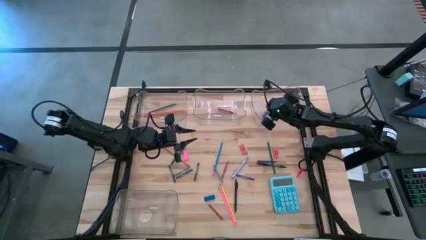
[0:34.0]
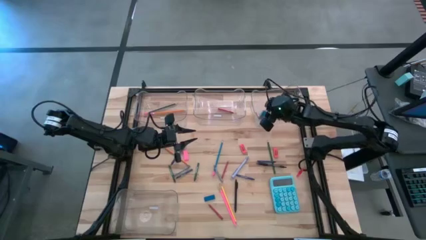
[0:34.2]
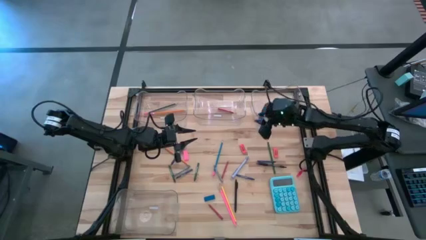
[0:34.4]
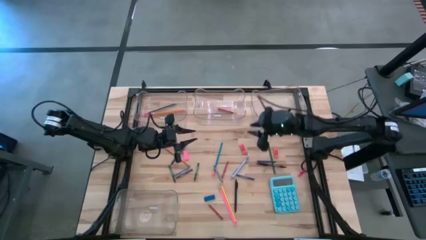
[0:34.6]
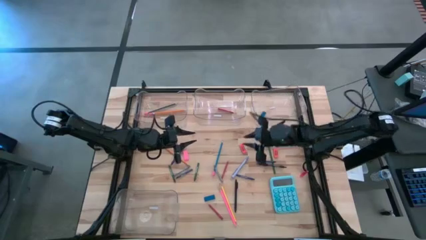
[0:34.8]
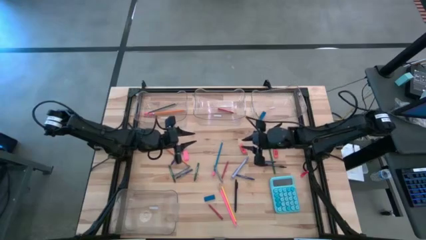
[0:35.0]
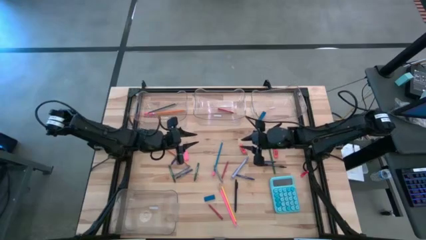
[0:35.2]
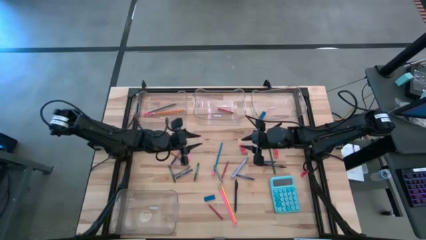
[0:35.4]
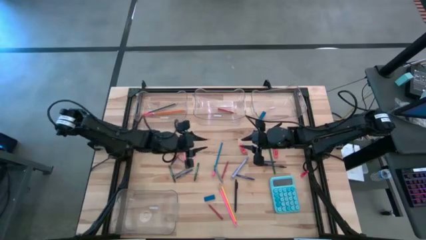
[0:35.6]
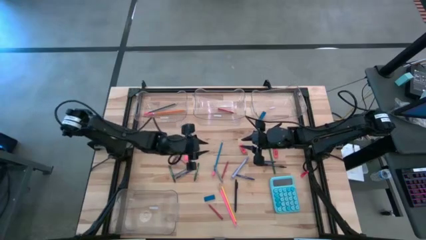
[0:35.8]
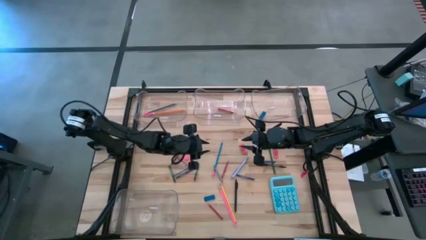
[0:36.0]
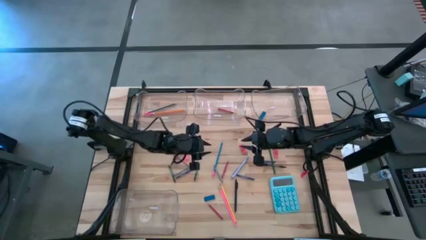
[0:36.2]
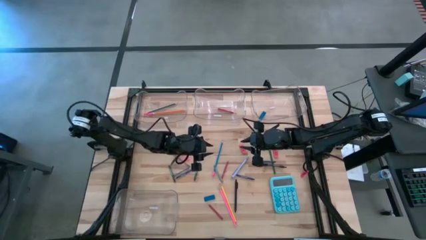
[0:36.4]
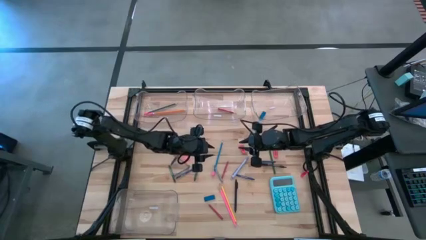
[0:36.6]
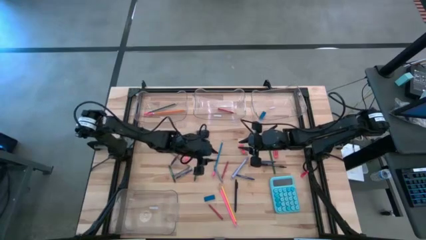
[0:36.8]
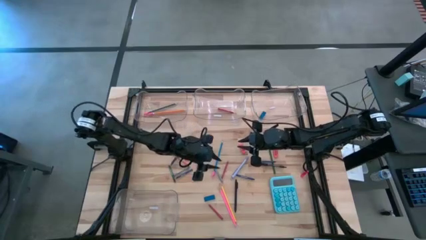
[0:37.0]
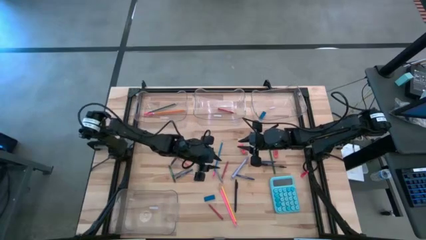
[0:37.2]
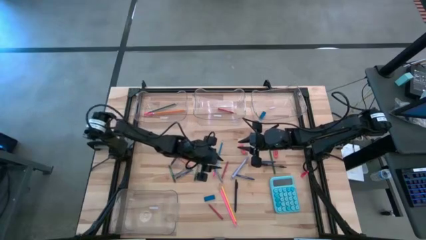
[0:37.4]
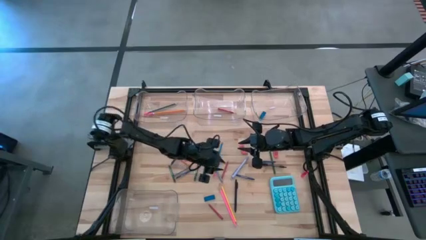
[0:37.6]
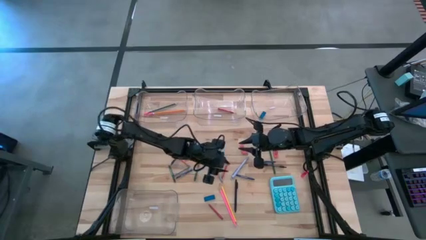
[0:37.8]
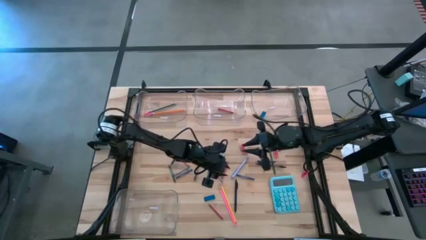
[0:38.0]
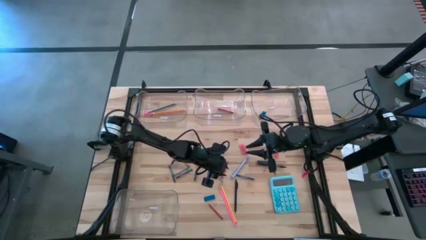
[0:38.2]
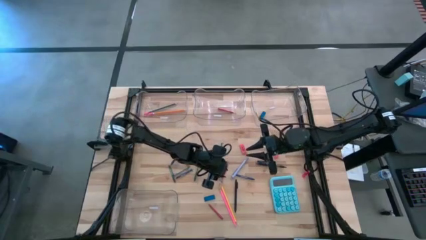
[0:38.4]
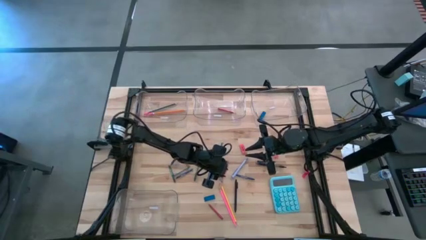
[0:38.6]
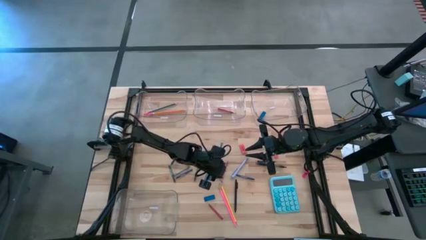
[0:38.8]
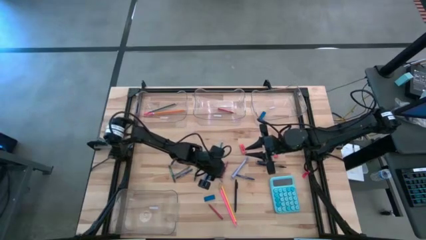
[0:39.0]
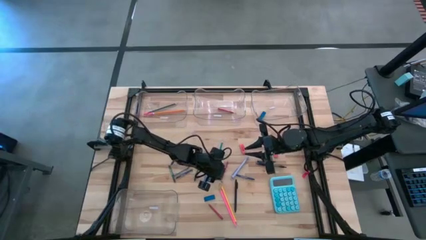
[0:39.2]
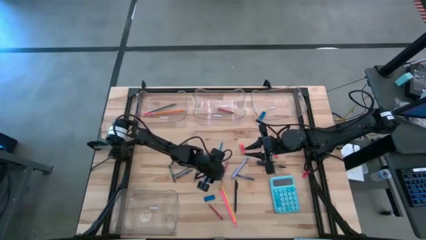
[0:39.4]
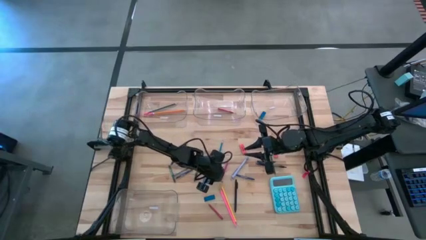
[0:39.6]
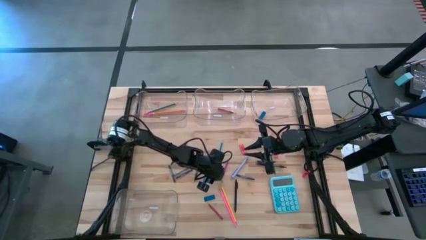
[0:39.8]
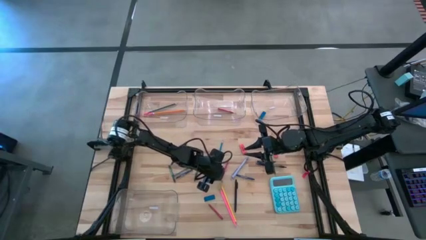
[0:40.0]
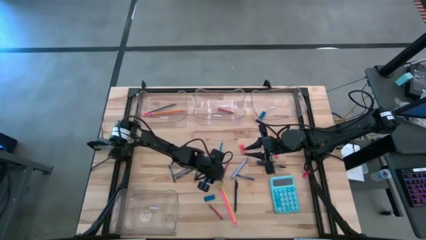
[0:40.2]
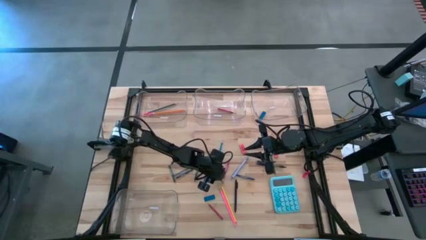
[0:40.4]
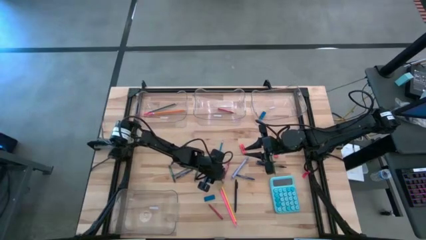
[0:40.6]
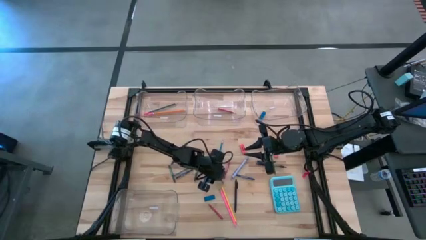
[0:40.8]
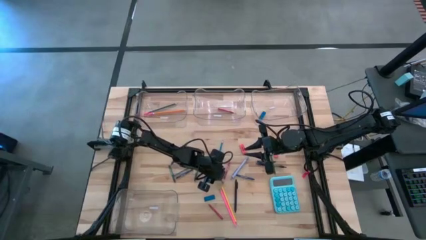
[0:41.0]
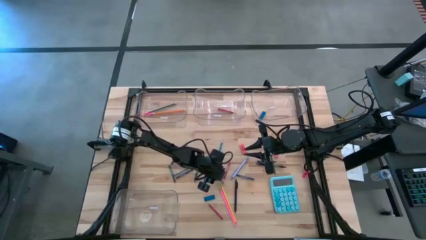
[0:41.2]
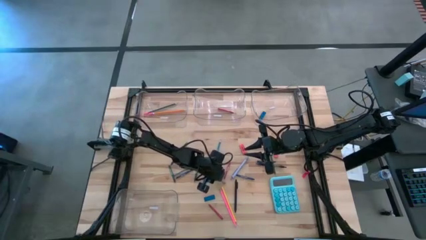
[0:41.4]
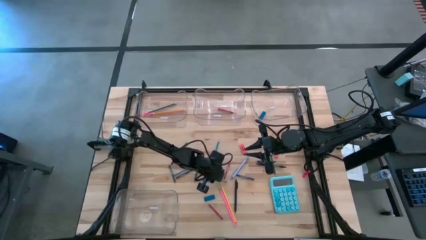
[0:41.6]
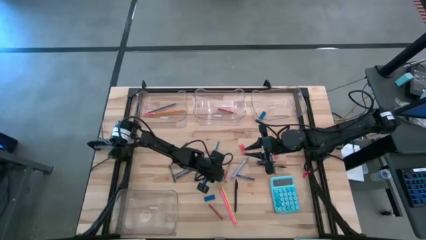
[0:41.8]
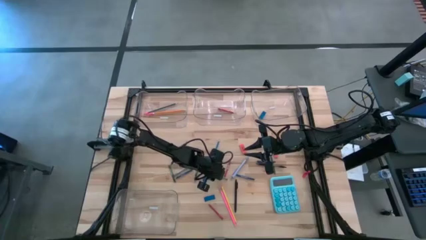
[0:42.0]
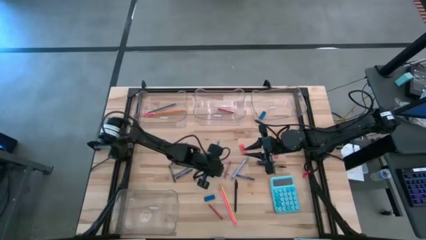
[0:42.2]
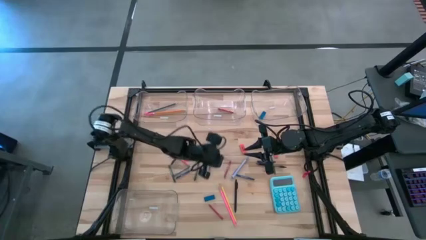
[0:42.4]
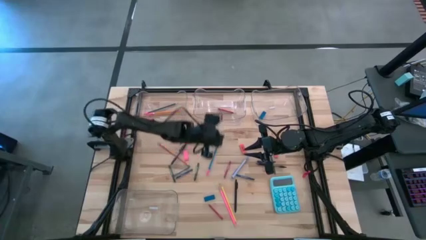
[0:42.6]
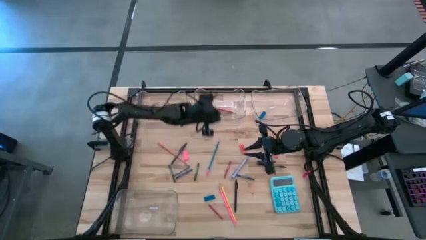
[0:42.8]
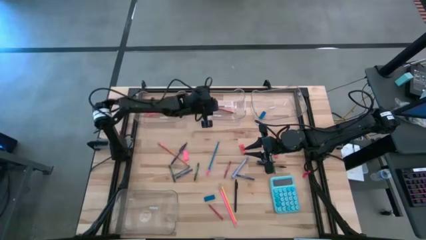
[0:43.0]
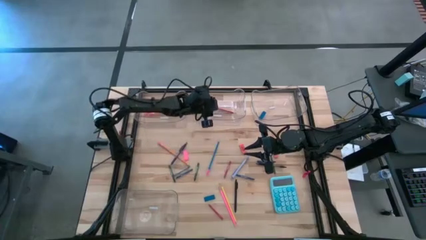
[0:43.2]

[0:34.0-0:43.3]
Task: Sort crayons/erasers/pens/pencils in bins
Put the gray crayon into the top middle transparent bin

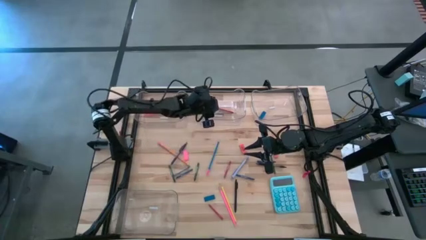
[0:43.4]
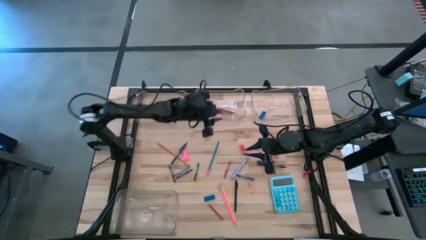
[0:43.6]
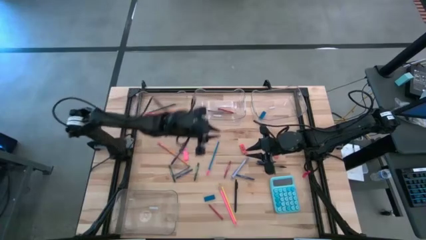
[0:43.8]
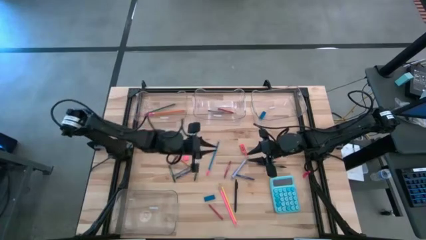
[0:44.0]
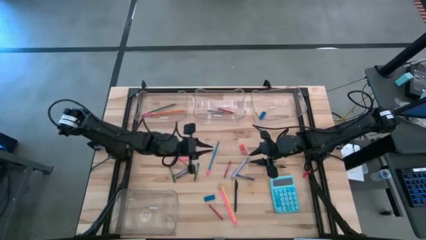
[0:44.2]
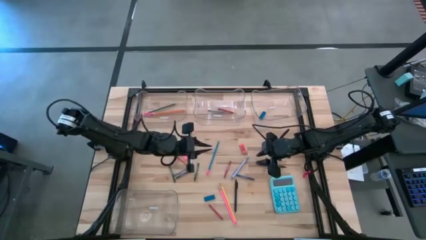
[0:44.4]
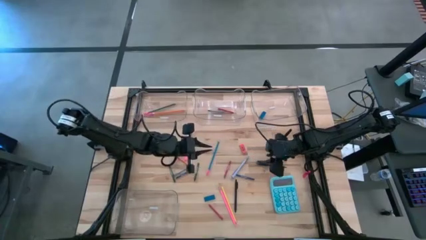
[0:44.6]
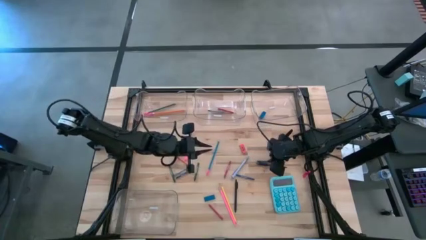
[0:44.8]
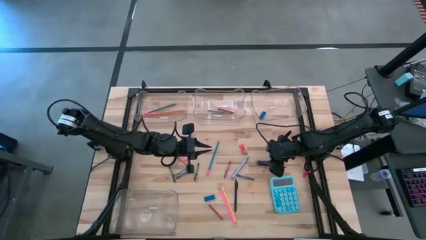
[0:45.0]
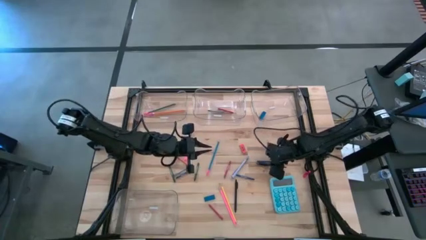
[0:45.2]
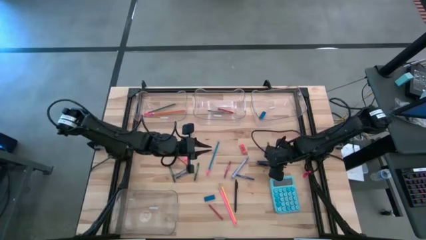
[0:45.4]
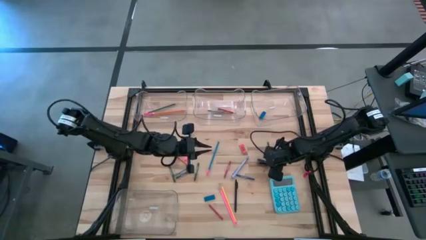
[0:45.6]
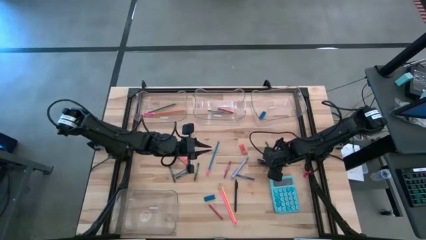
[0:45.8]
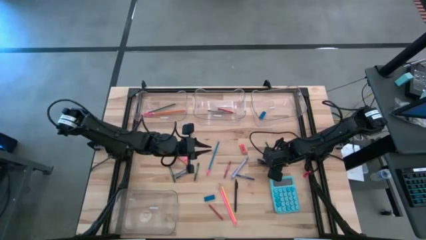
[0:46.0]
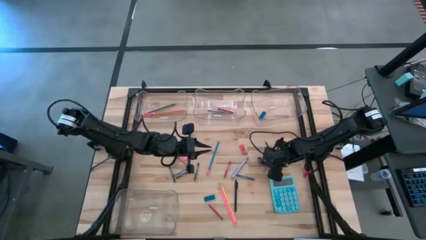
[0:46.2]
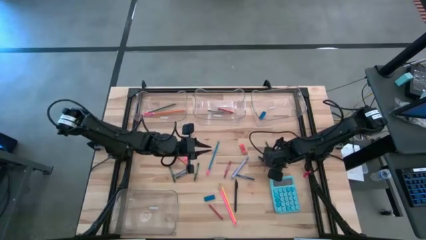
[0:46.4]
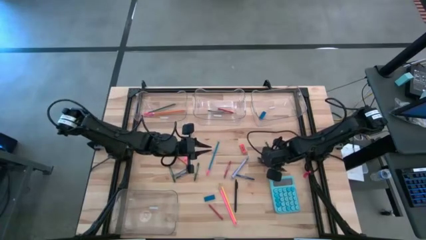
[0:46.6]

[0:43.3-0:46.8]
Put the black pen into the bottom transparent bin

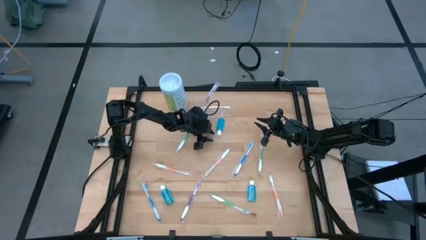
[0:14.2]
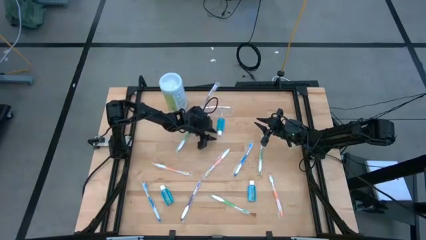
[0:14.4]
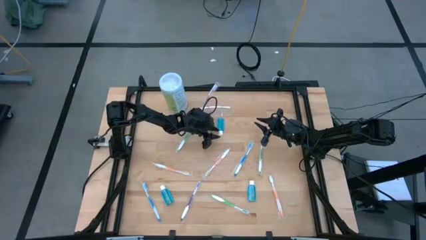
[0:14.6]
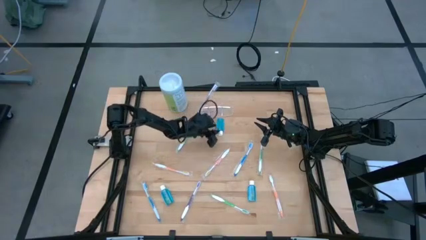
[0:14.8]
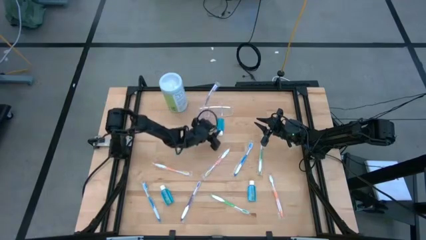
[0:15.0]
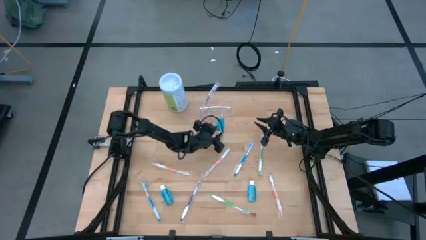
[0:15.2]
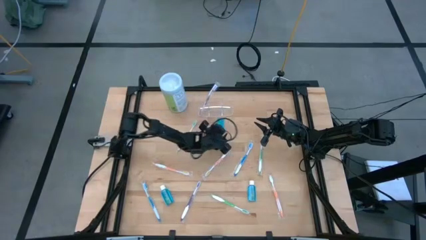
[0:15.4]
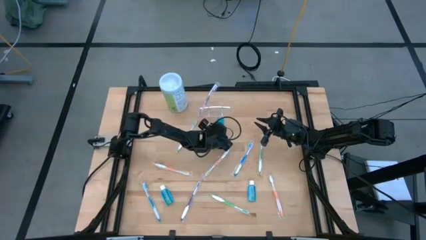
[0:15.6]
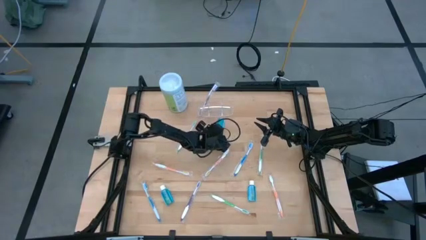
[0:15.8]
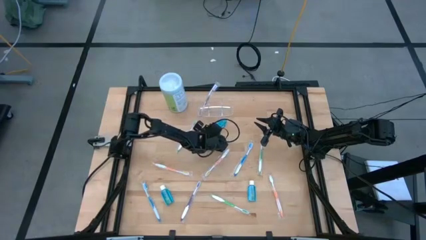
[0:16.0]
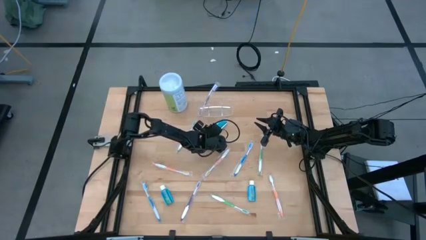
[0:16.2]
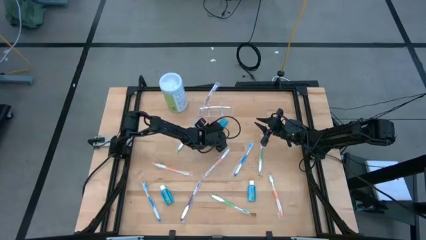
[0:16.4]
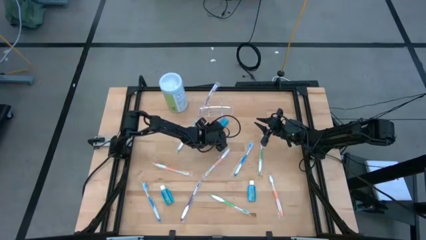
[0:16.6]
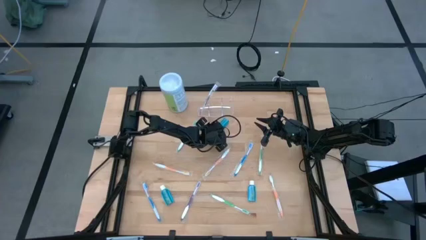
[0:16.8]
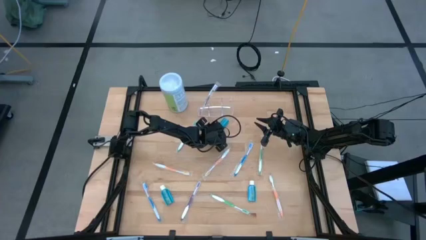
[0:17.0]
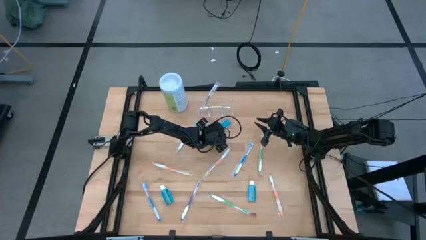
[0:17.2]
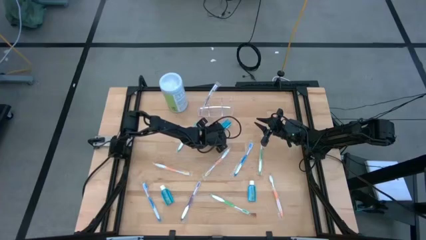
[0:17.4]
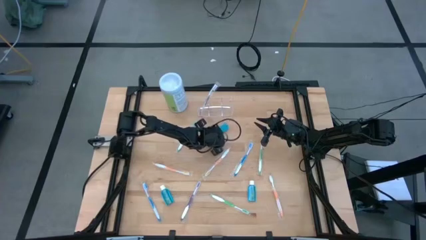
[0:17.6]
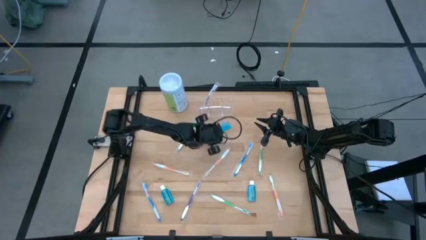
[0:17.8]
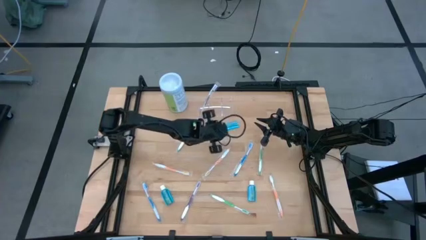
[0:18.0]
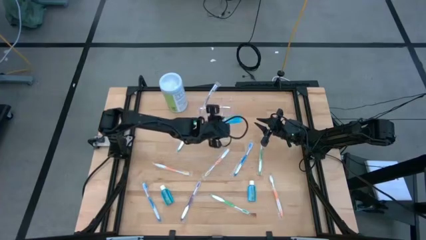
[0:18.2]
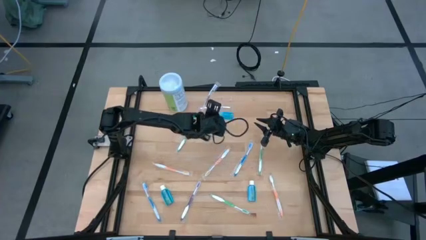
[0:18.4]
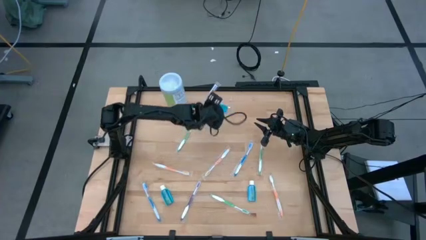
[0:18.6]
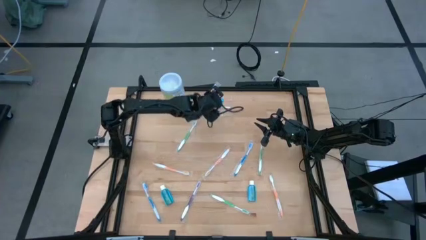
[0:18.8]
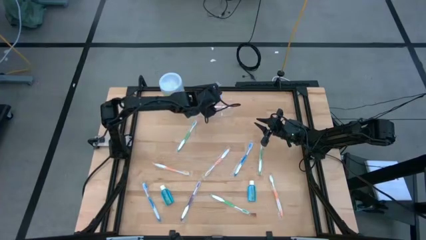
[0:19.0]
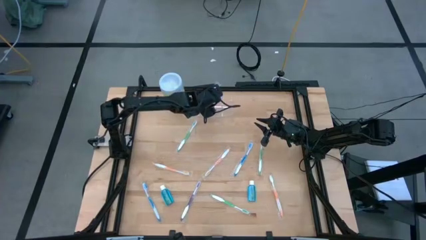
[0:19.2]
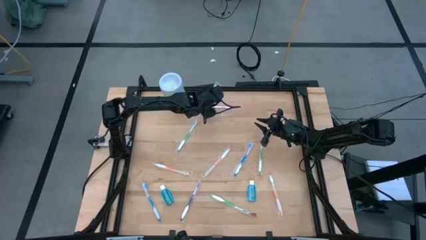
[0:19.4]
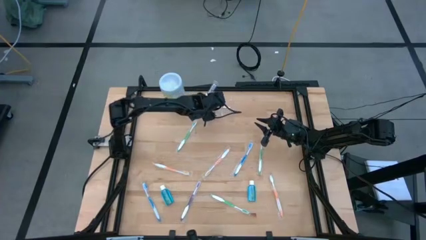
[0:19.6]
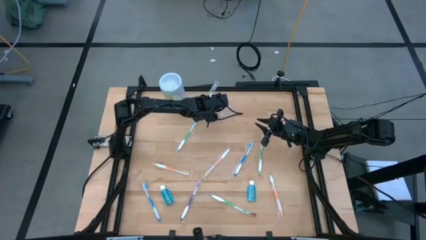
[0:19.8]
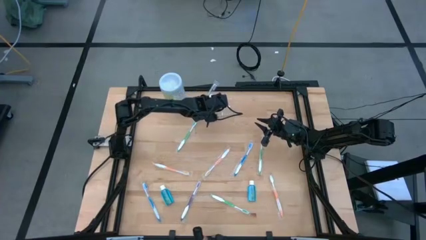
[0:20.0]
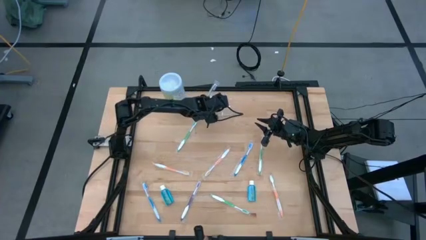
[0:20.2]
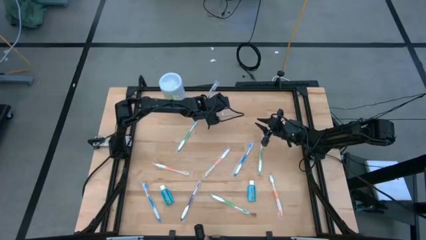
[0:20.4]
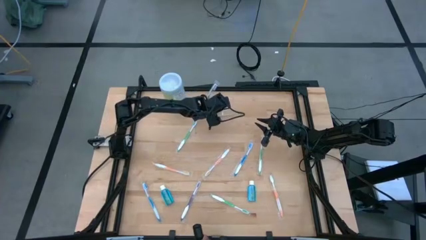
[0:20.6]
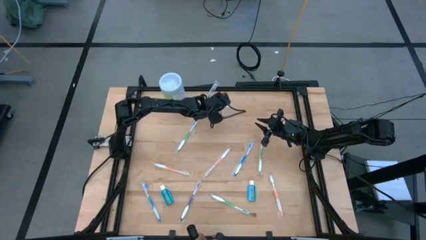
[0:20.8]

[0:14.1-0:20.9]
Task: Pick & Place toothbrushing station
Put the top blue mouthwash into the transparent organizer
